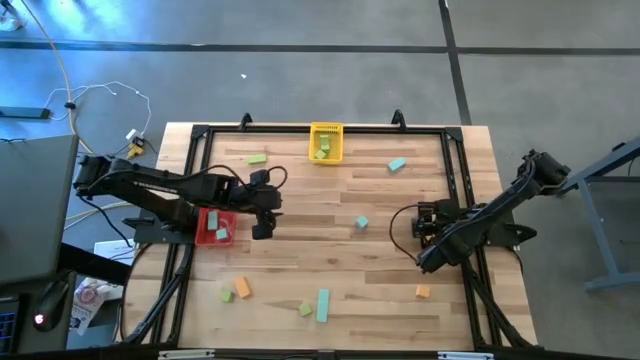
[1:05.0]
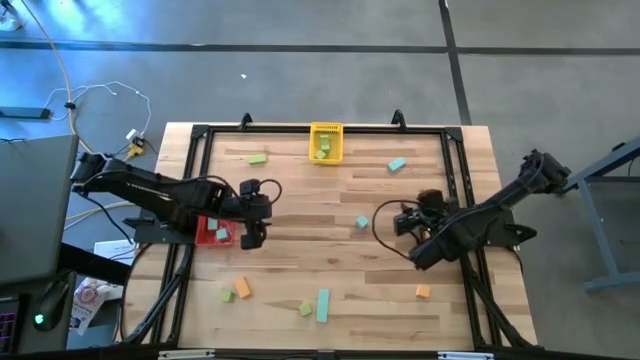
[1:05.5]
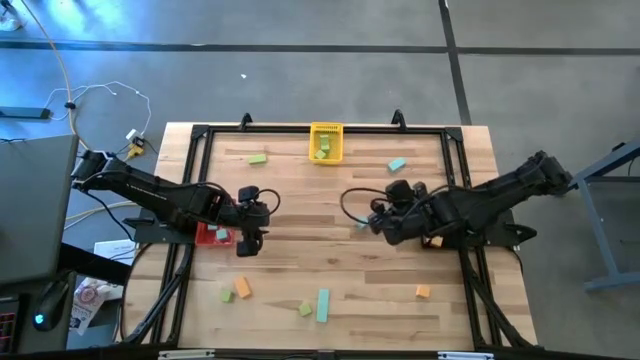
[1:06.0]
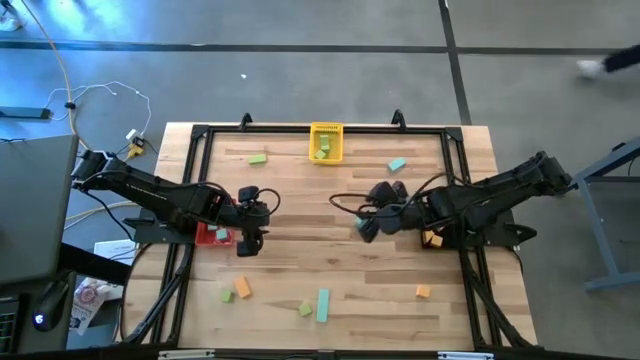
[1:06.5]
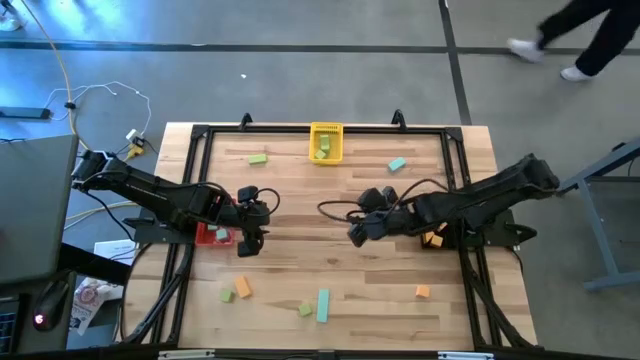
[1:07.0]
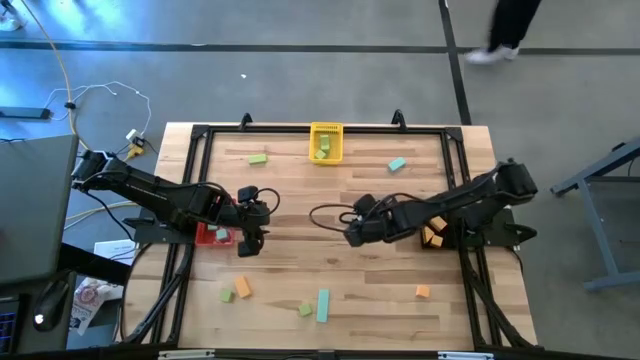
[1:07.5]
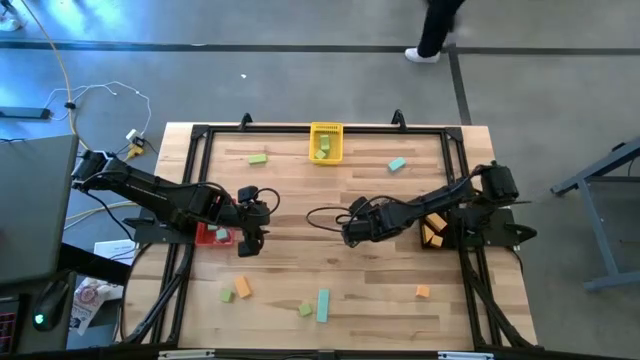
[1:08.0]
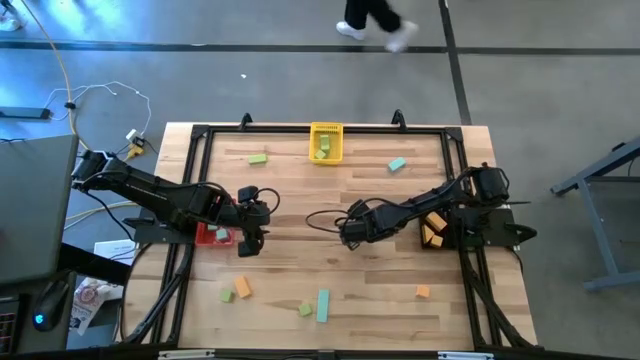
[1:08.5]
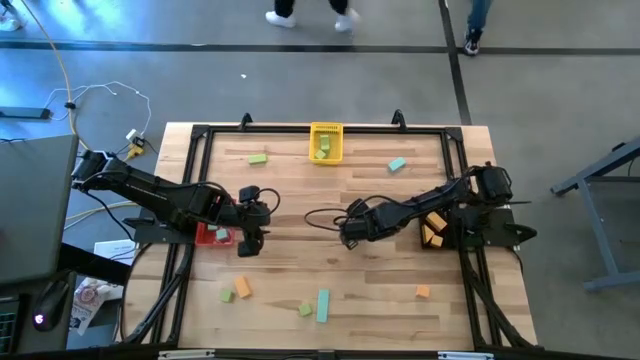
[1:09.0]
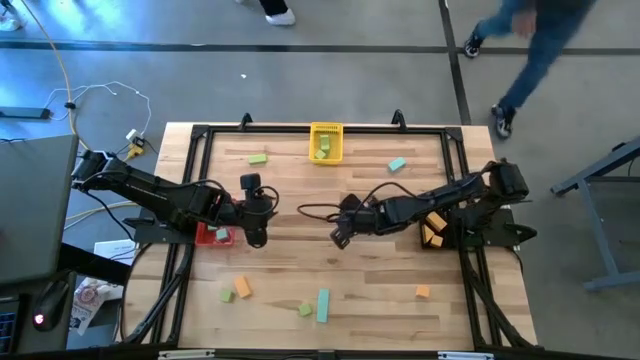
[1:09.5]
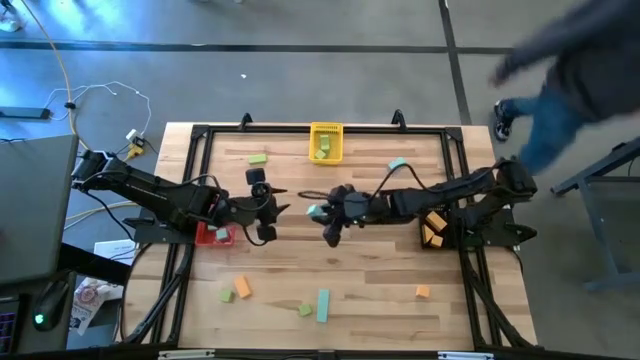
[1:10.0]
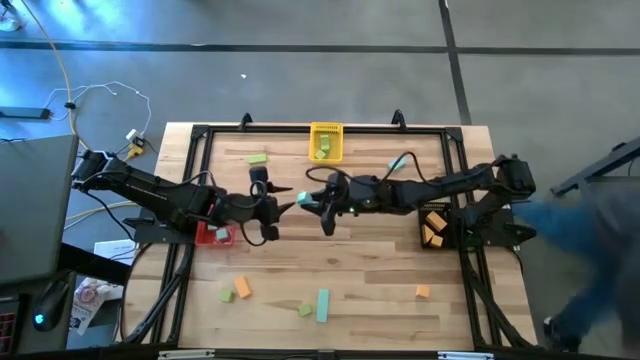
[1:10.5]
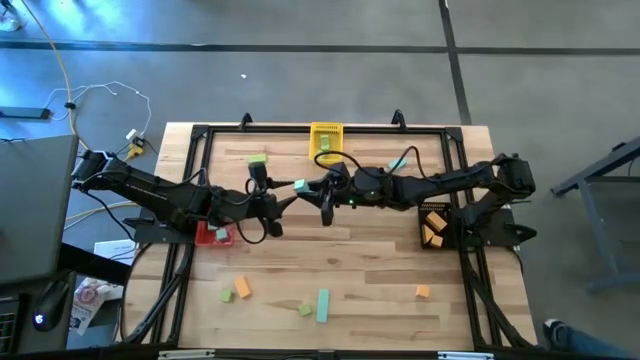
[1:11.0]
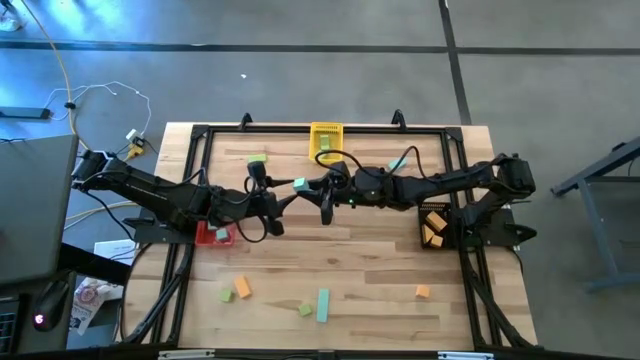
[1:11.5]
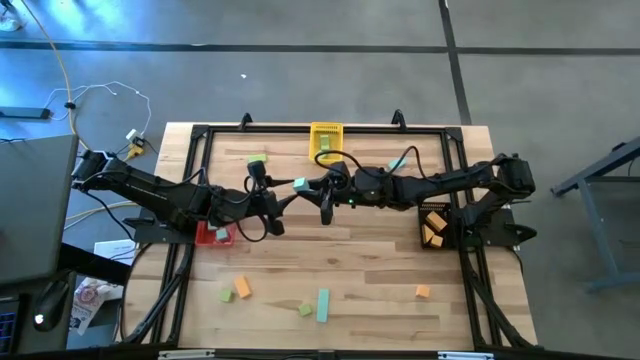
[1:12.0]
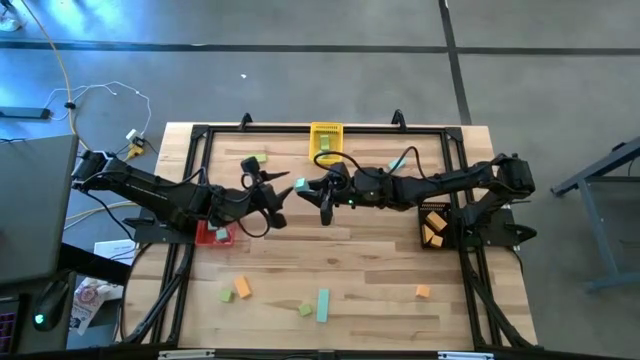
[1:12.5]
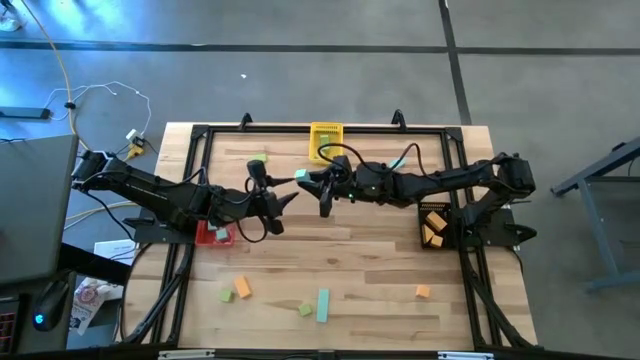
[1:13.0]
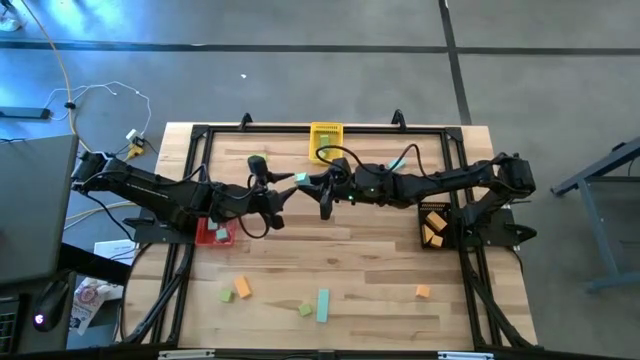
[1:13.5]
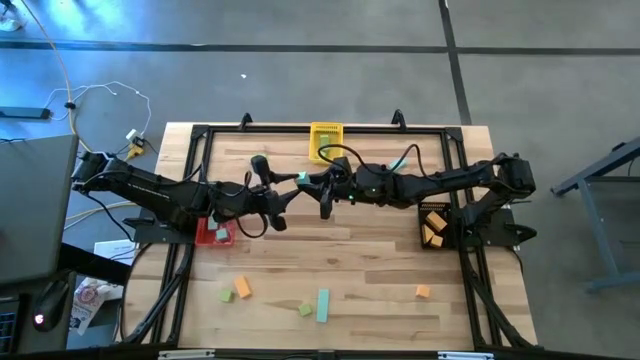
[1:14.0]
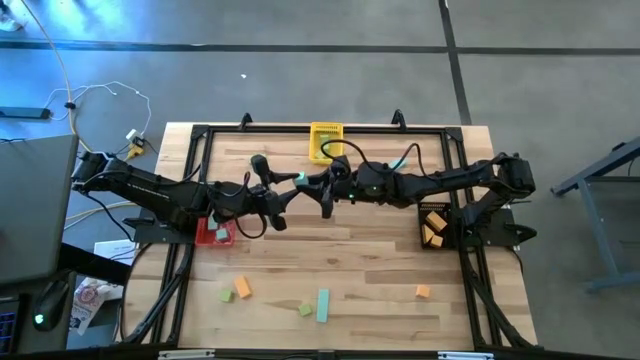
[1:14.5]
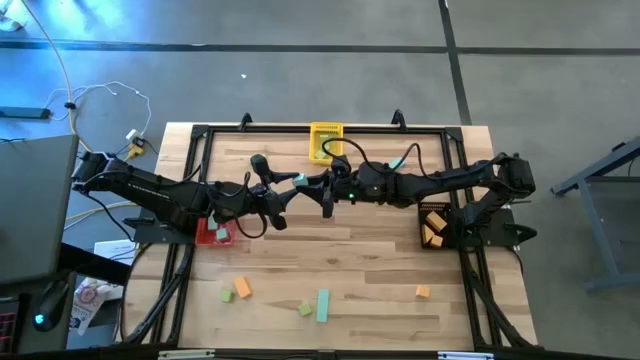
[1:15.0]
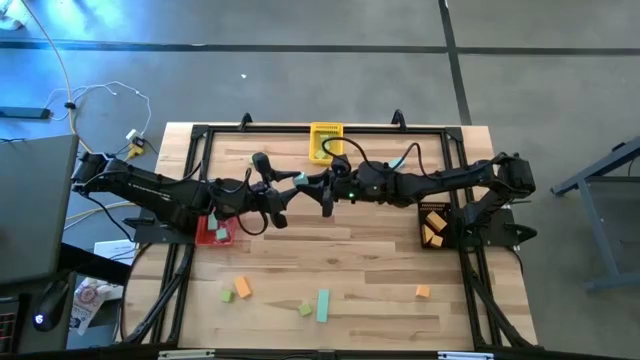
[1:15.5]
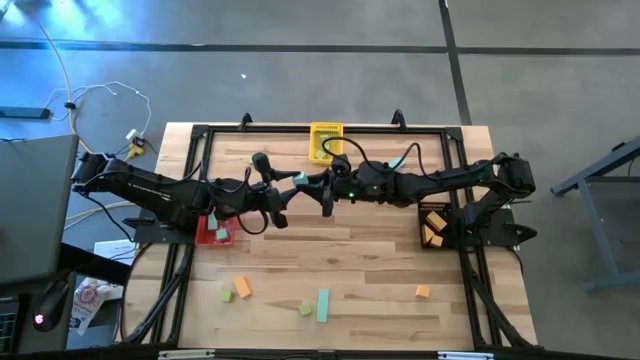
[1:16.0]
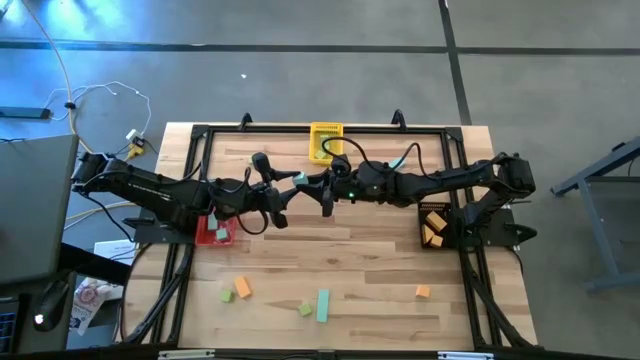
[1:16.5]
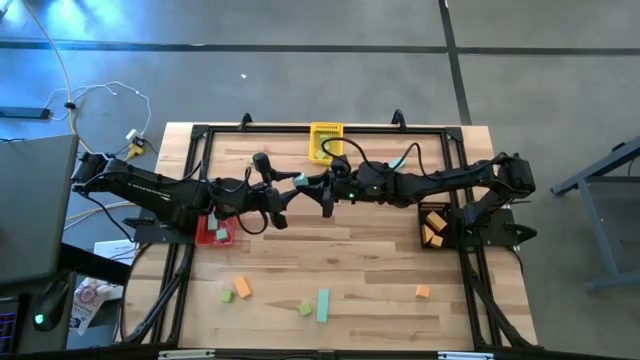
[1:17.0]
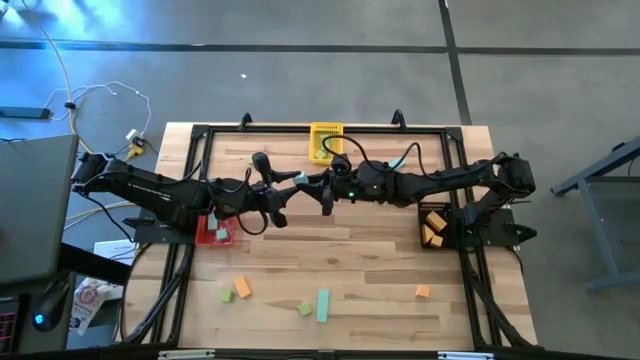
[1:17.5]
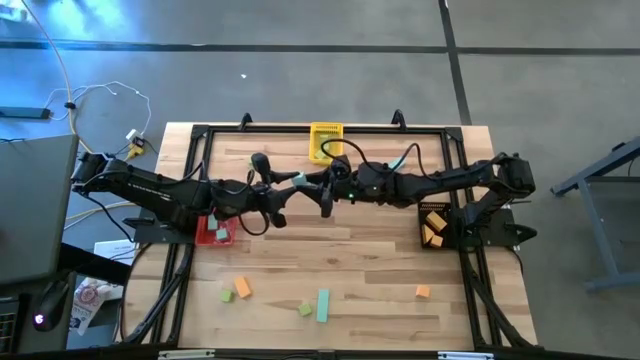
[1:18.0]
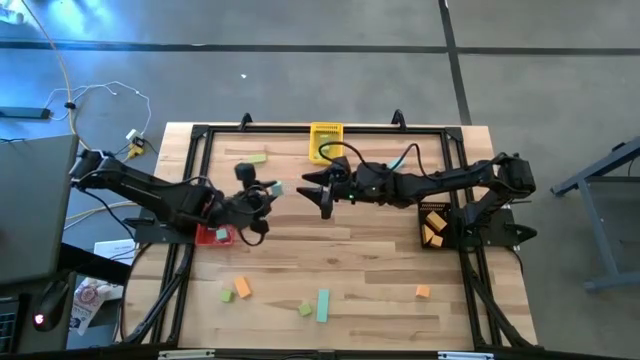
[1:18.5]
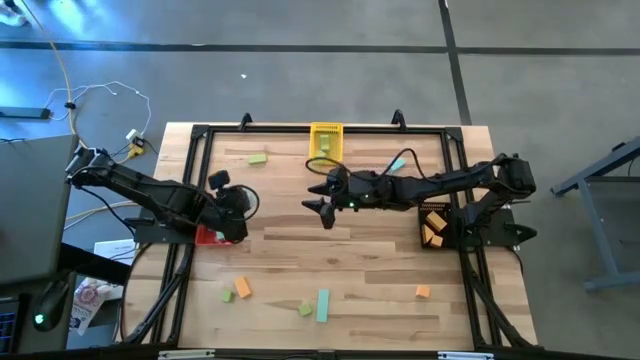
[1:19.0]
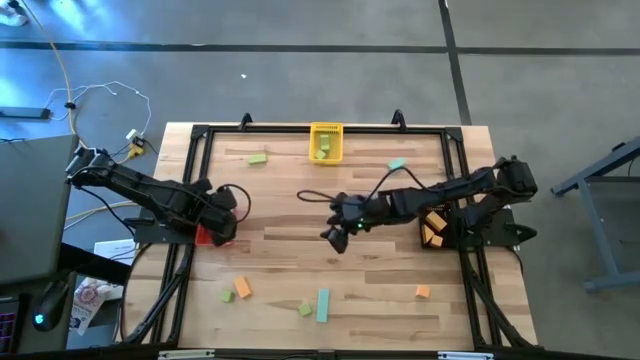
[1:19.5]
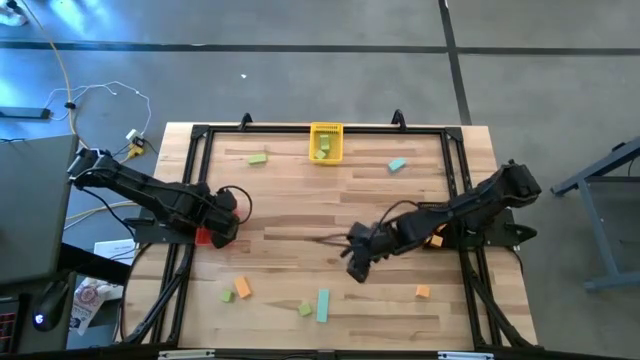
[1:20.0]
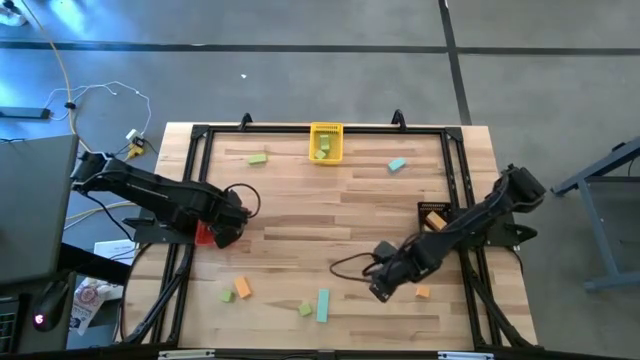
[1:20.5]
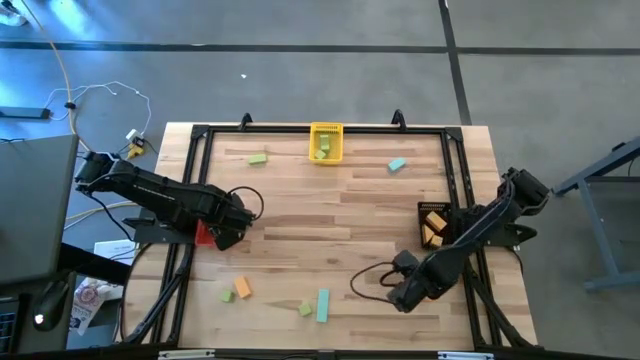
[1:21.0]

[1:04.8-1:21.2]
Task: Sort & place blocks by color
Put the blue block into the red bin

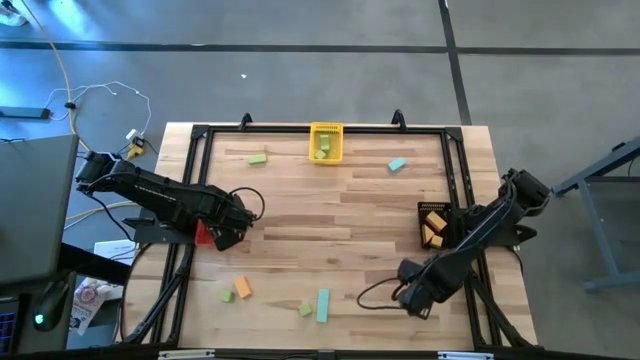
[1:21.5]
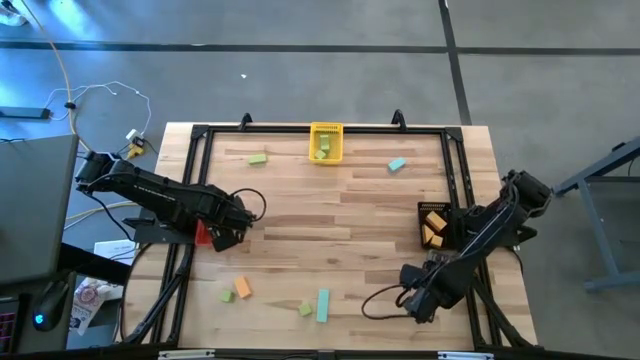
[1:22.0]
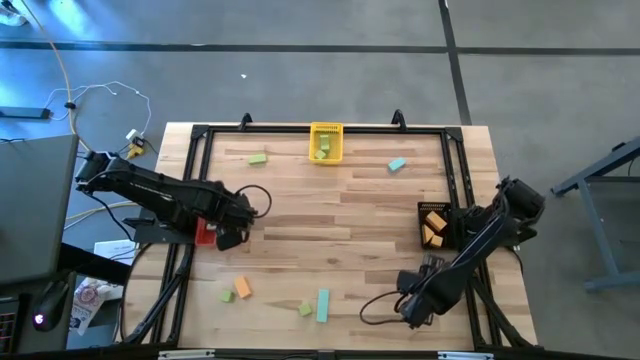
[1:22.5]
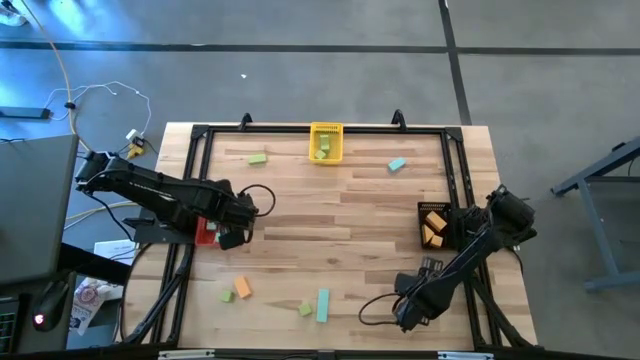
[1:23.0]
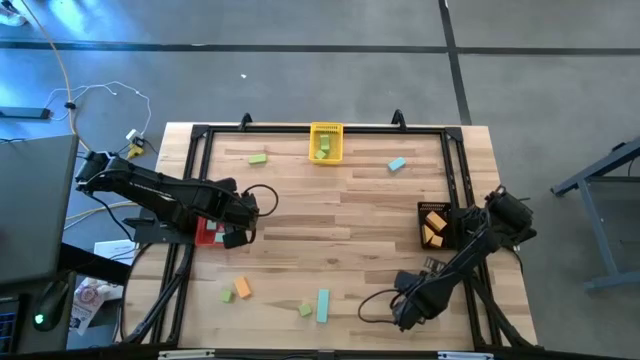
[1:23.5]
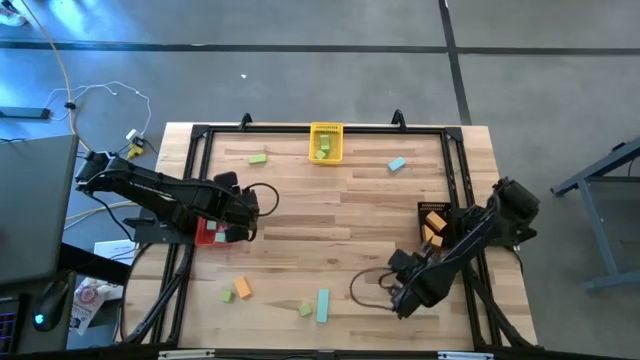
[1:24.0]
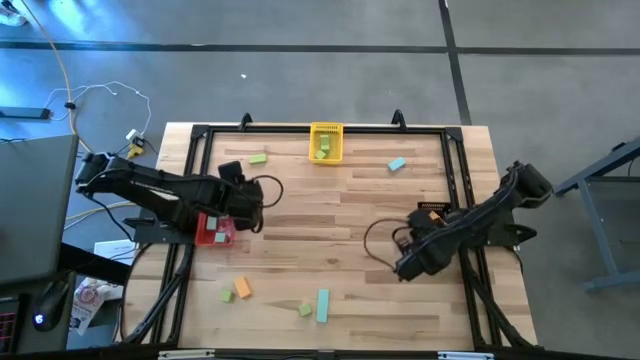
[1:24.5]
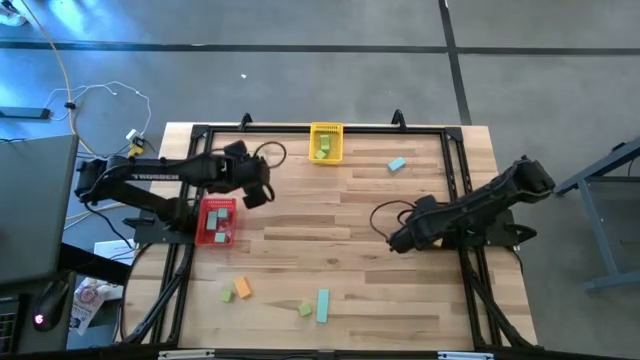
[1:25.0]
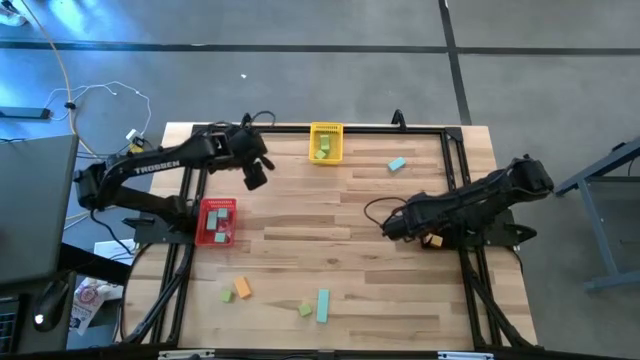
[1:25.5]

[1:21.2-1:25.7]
Put the orange block into the black bin

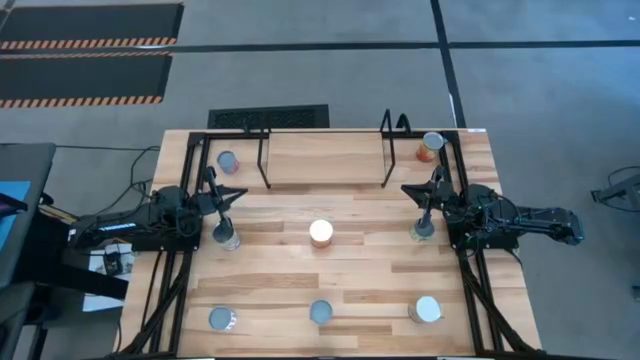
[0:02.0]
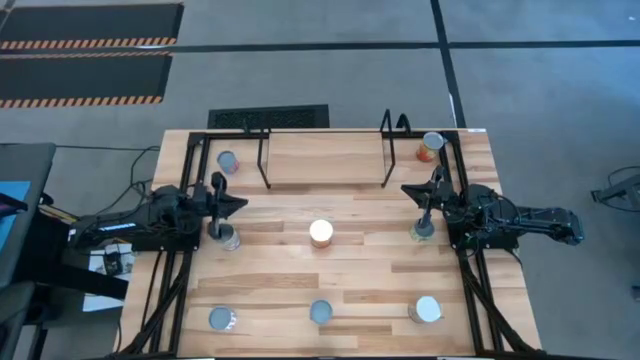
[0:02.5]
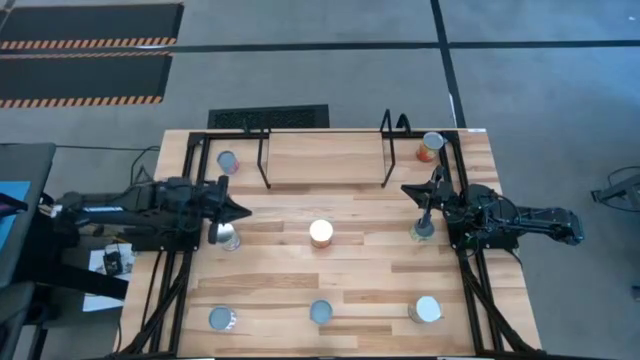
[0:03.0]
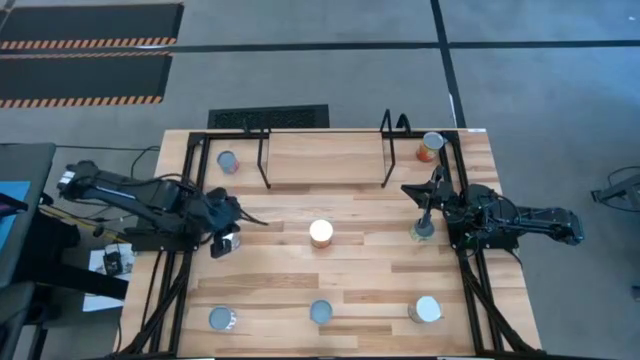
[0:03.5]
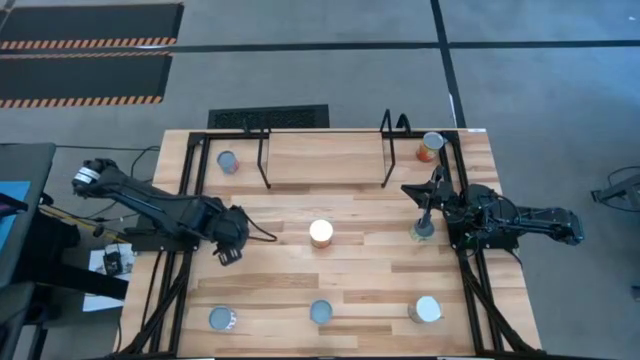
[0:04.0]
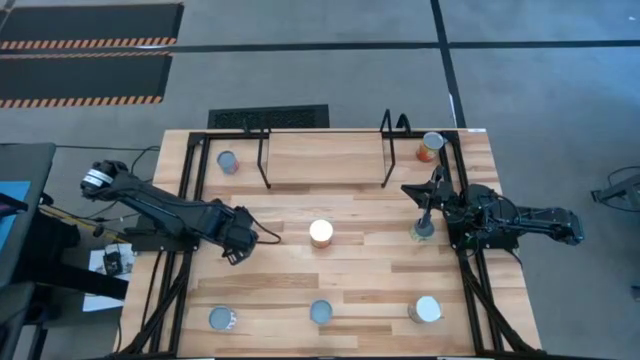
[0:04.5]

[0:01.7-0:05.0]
Task: Pick and place cans onto a shelf
Put the canned peaches on top of the shelf
